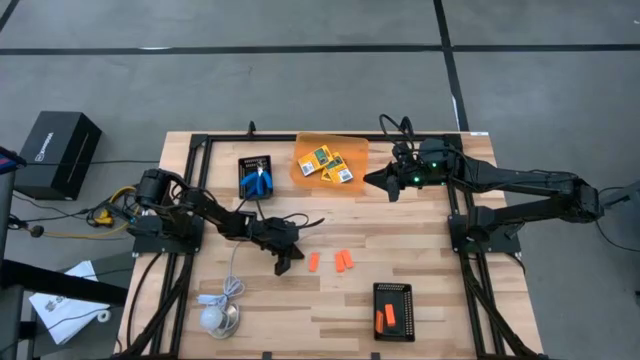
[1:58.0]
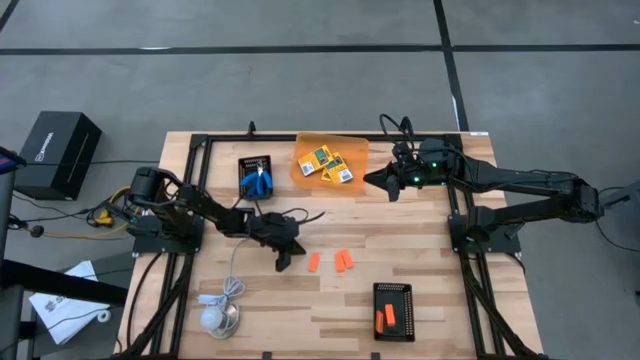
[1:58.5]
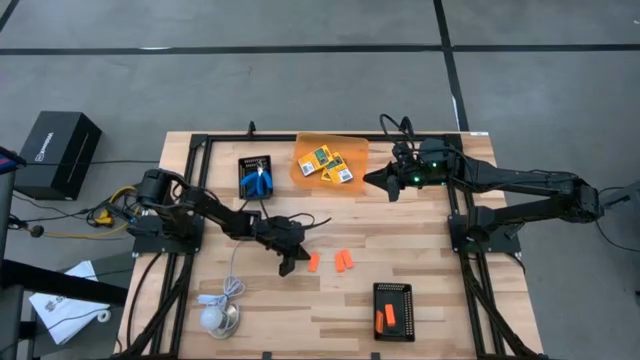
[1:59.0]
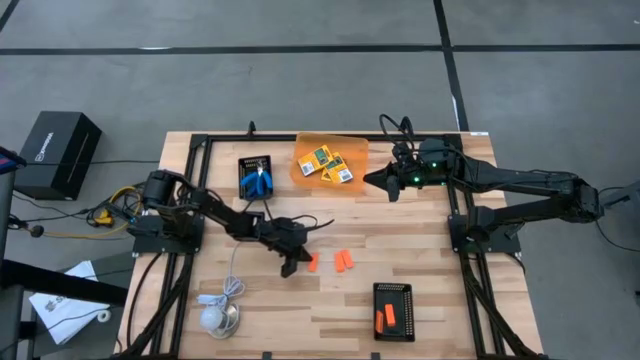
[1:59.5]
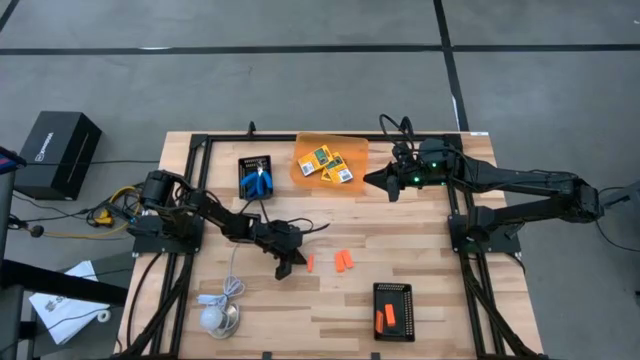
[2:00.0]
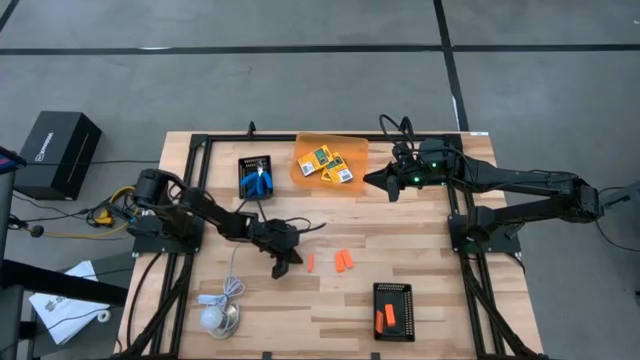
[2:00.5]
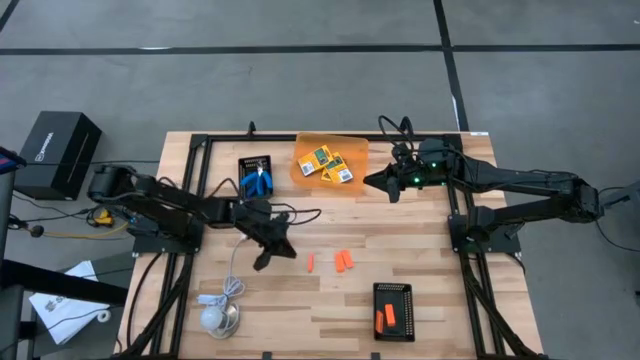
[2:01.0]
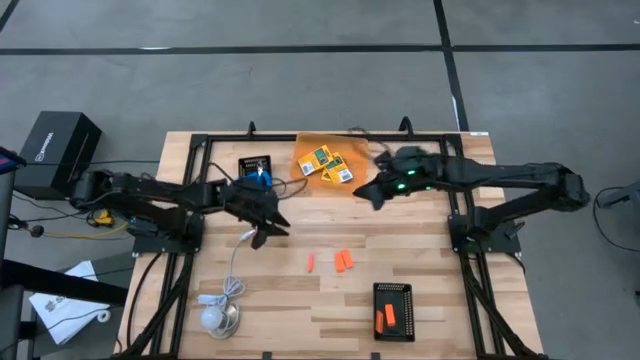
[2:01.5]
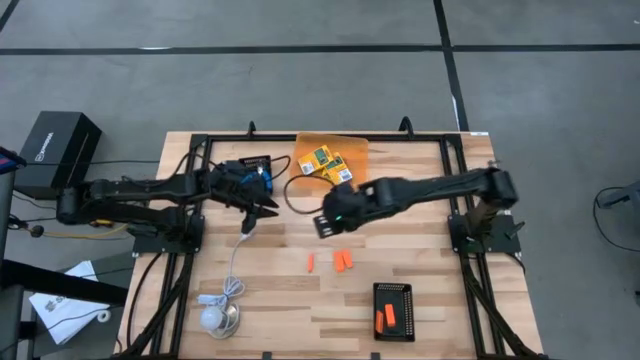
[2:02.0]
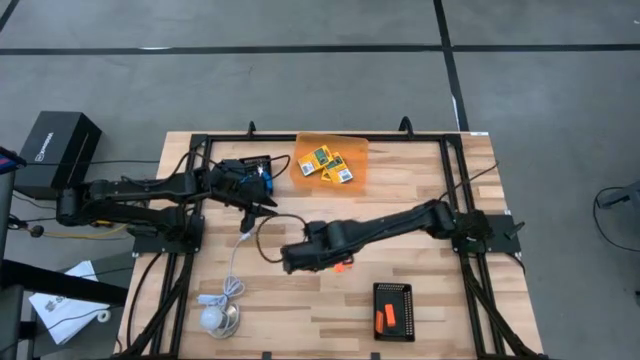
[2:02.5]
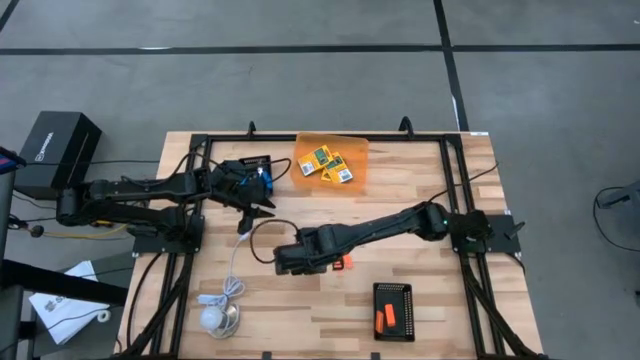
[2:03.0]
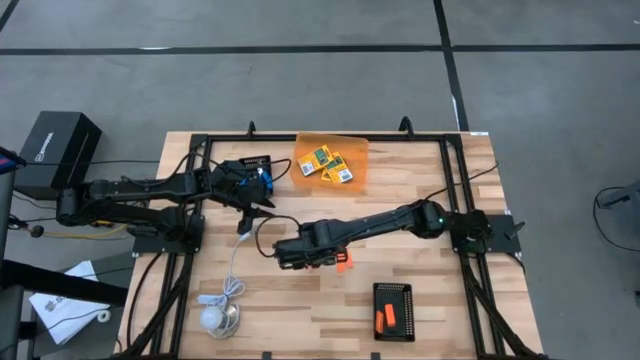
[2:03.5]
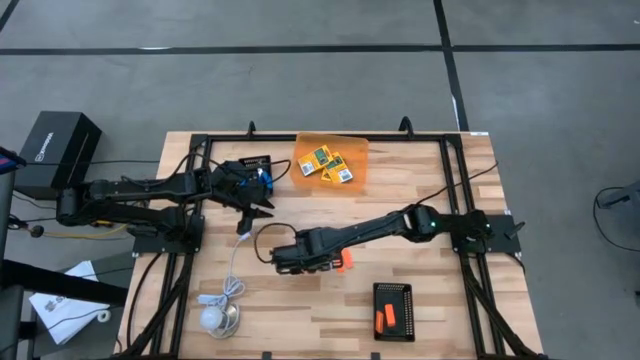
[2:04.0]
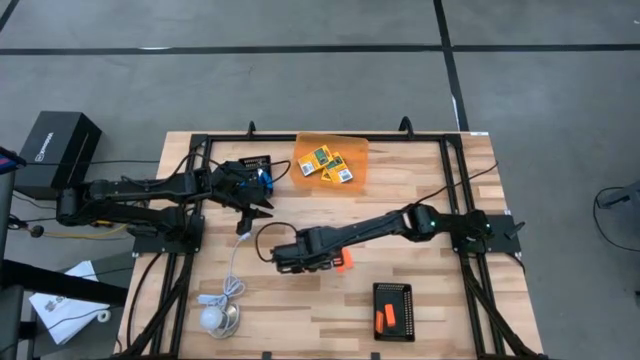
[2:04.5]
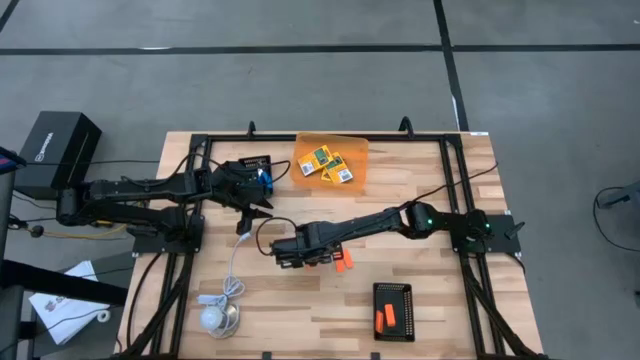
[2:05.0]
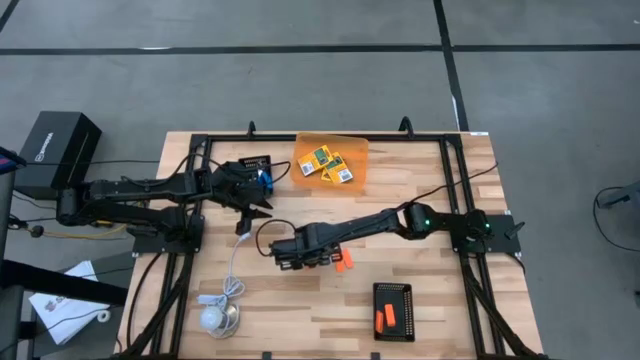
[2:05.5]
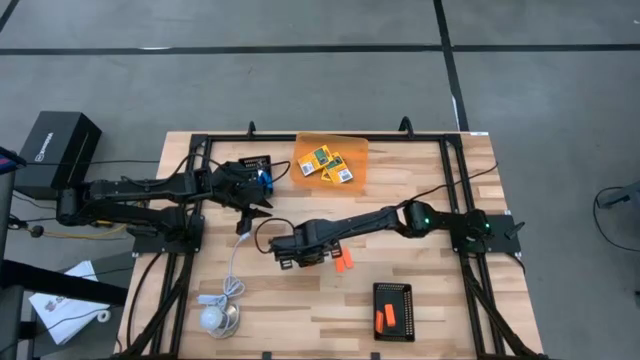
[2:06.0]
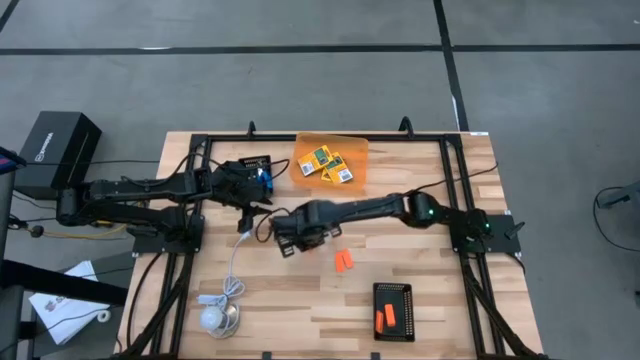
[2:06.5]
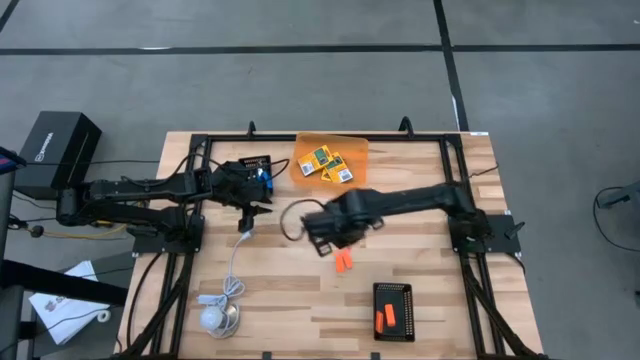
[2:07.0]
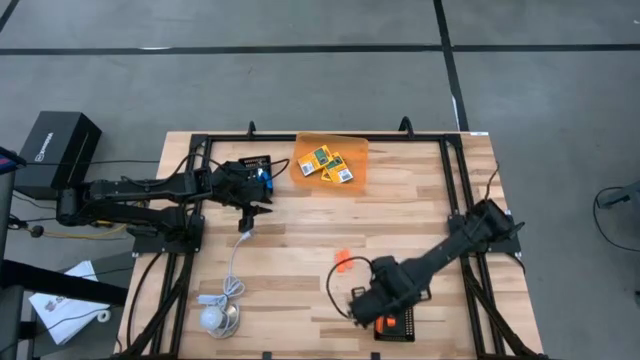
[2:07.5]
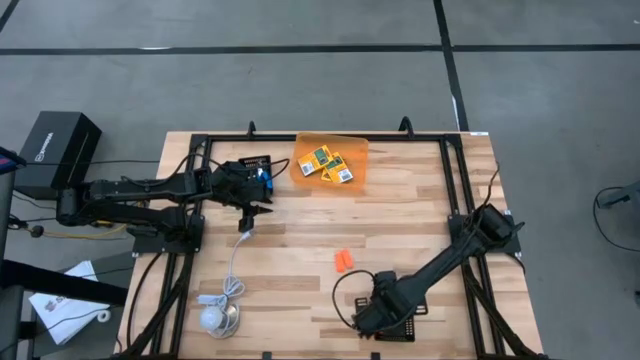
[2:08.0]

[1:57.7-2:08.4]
Task: Pick & Place School Supplies
Put the eraser into the bottom black bin

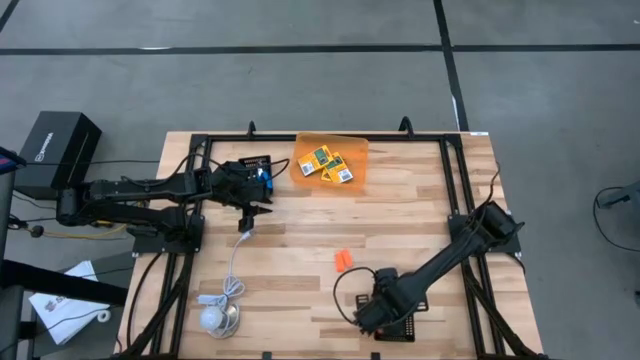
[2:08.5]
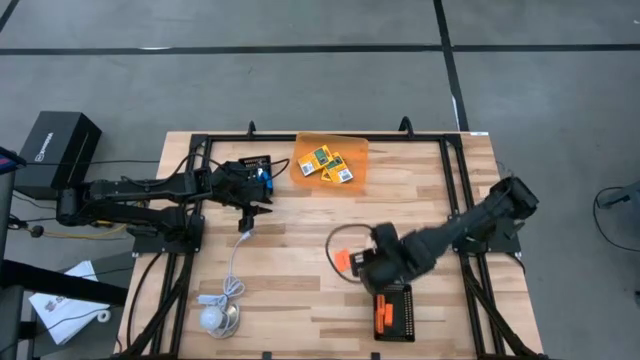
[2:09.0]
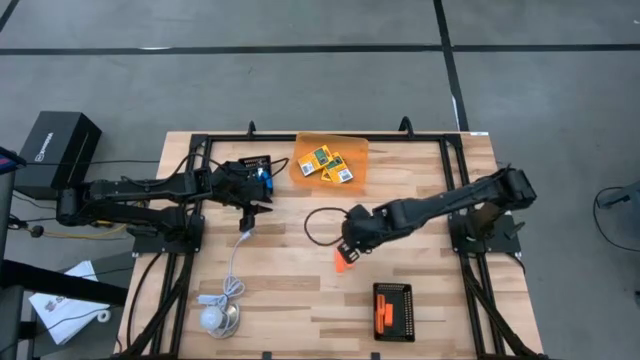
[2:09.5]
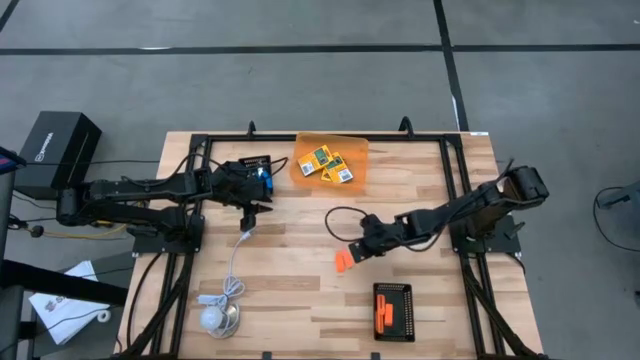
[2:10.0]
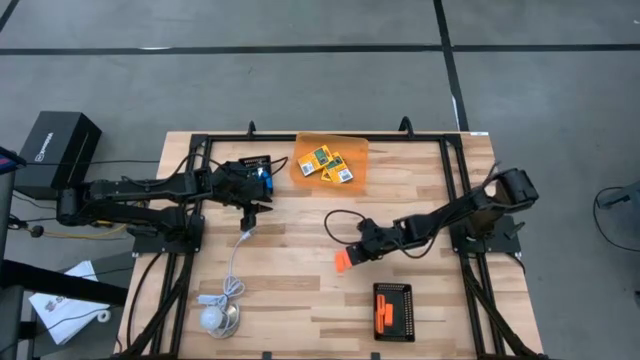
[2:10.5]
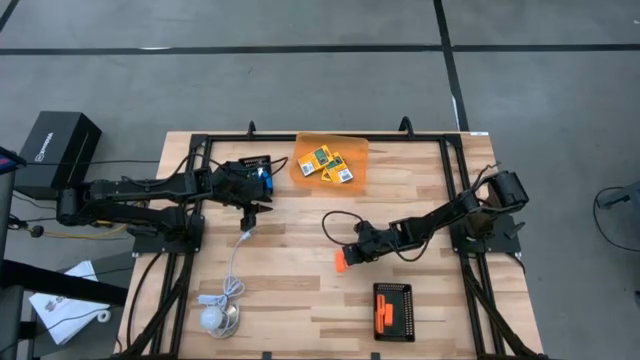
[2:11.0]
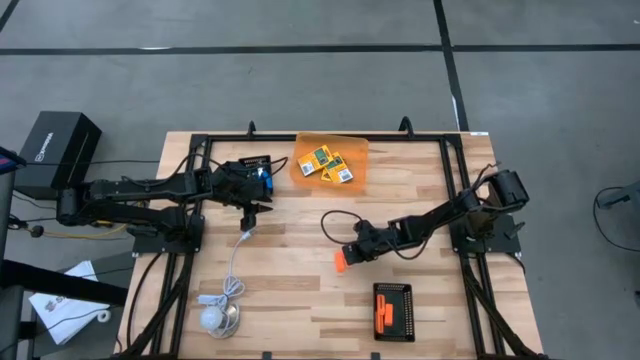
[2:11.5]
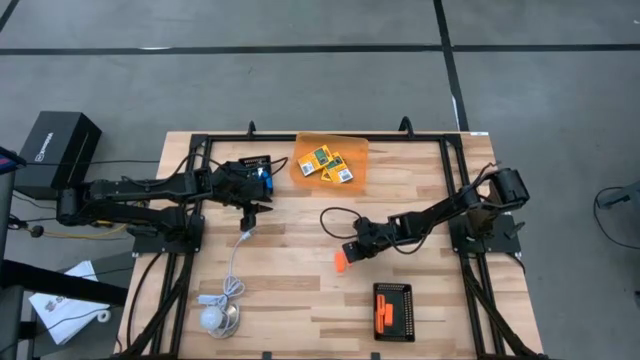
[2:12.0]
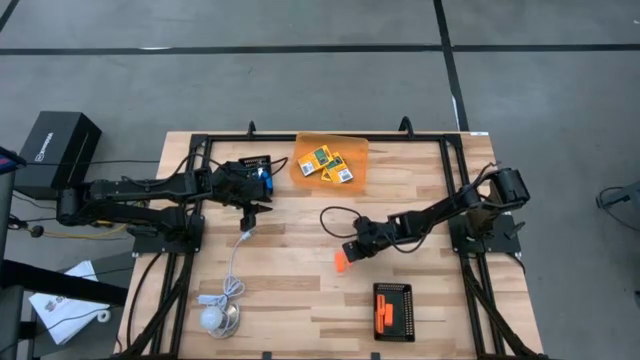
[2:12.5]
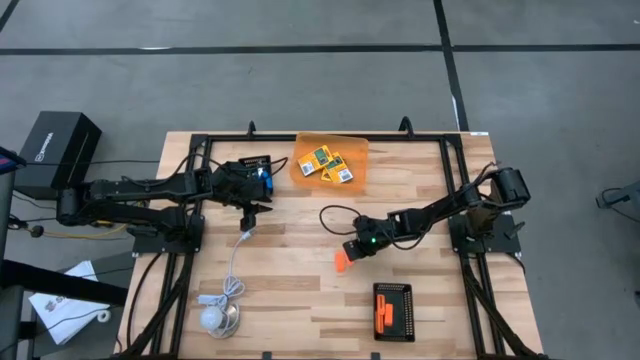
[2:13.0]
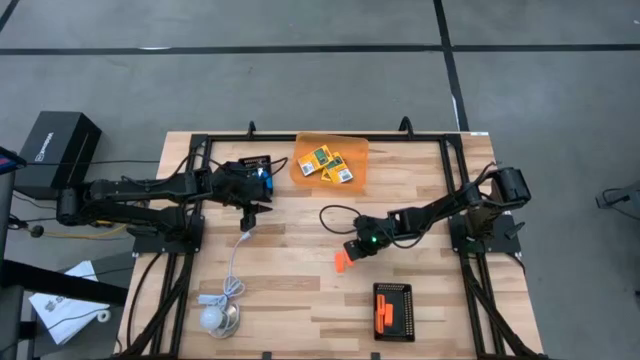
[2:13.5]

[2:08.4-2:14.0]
Put the eraser into the bottom black bin

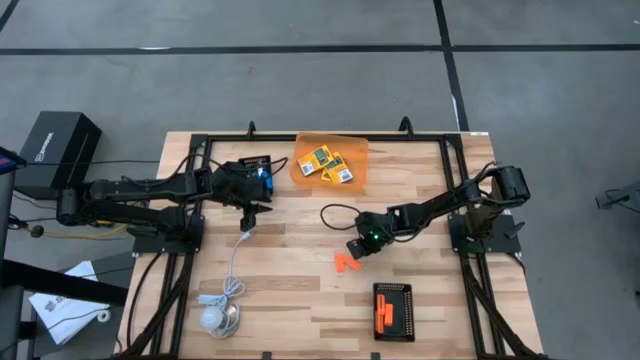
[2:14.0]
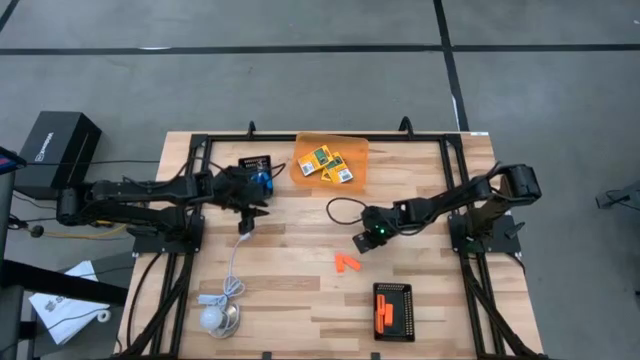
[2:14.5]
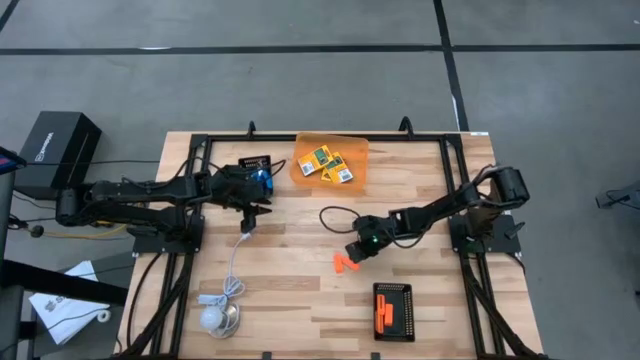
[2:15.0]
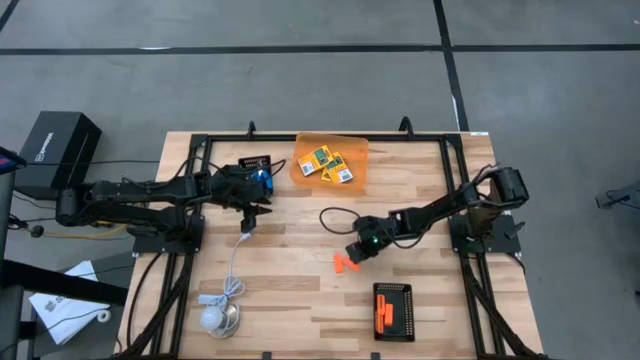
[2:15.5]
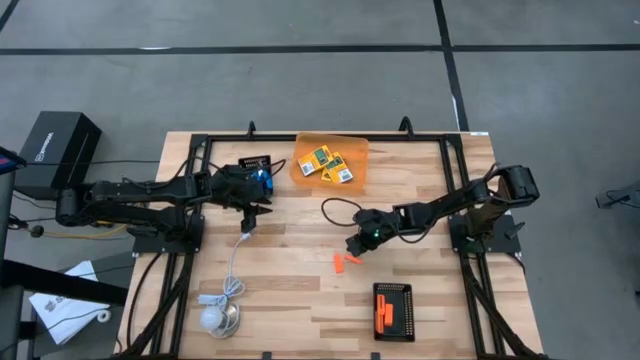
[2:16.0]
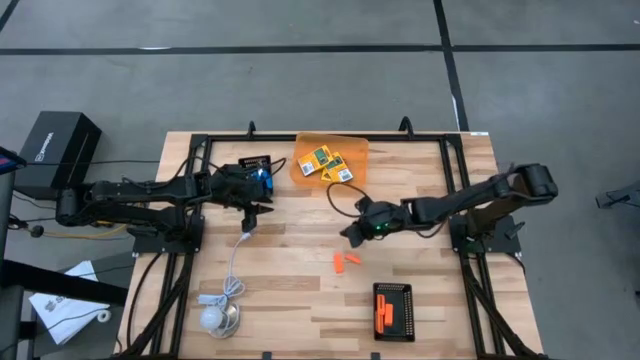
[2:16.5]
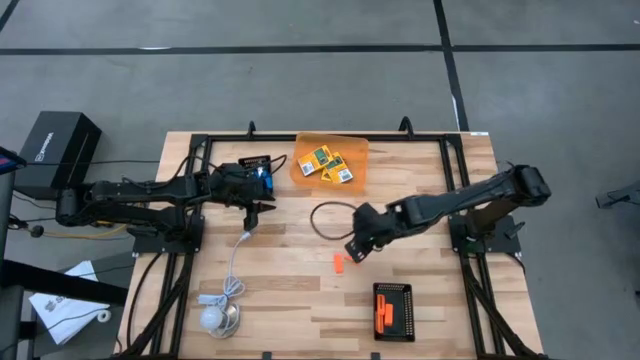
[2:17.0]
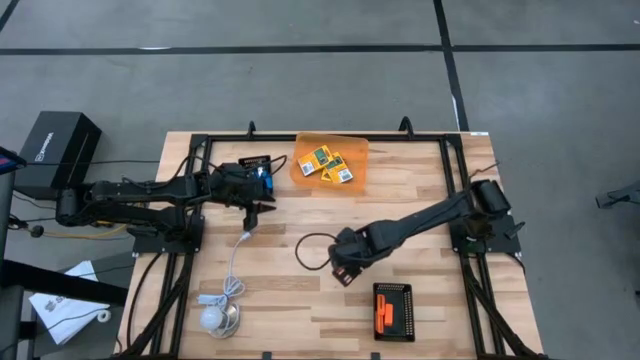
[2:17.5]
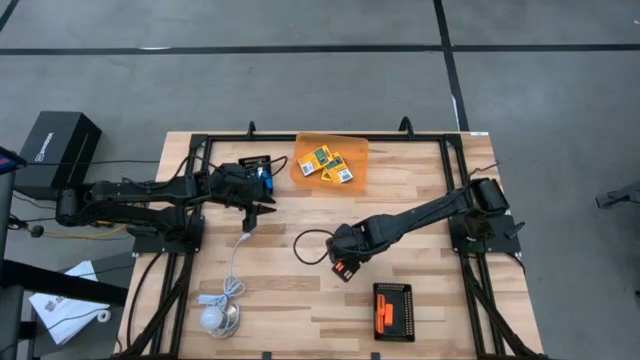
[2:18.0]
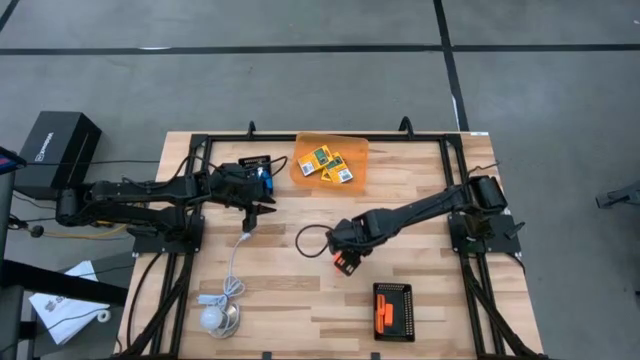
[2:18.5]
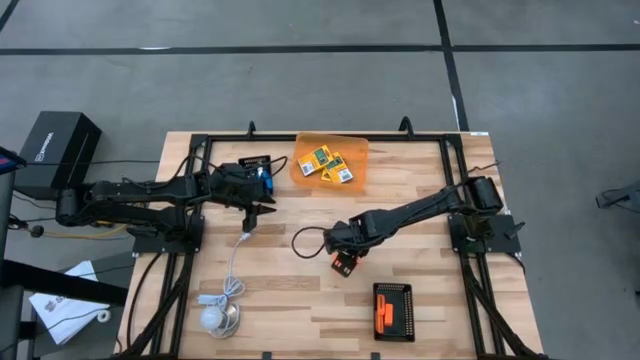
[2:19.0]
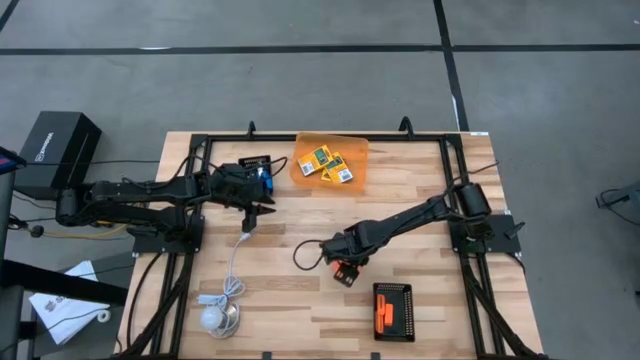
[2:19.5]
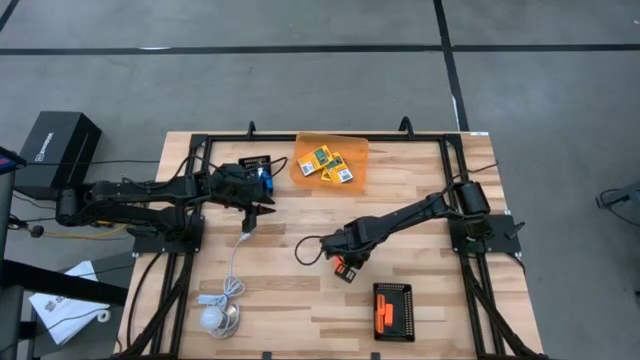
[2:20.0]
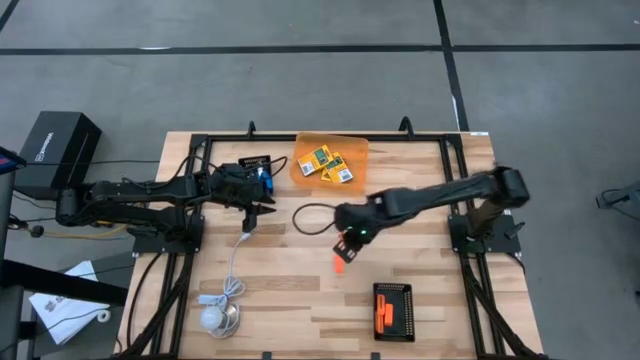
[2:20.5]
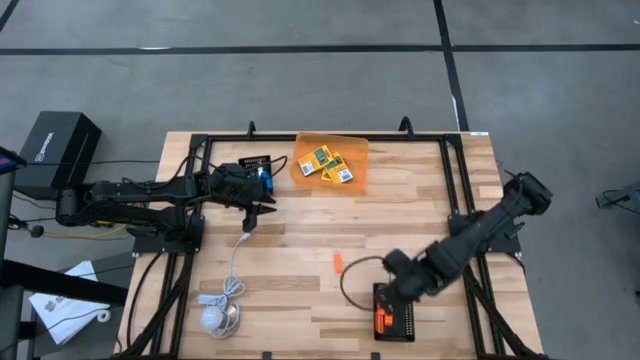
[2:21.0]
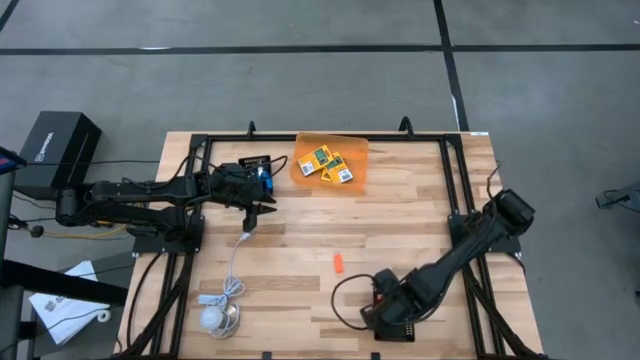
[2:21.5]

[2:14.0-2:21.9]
Put the eraser into the bottom black bin
